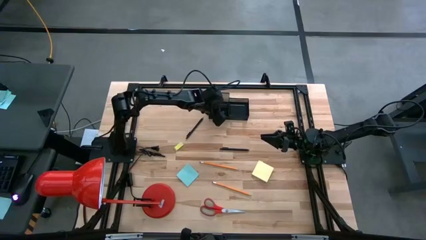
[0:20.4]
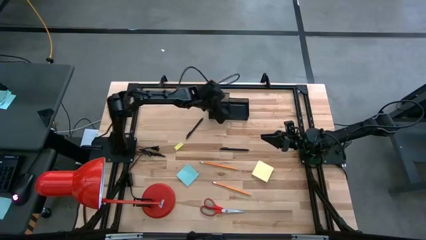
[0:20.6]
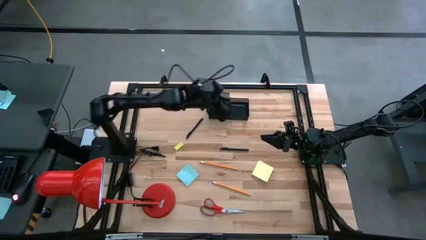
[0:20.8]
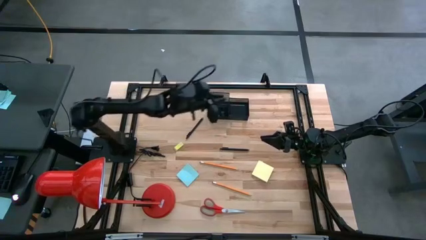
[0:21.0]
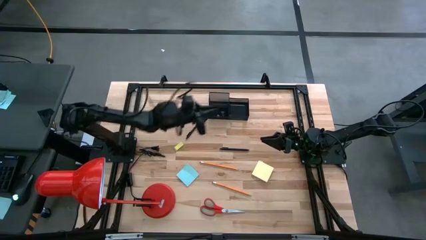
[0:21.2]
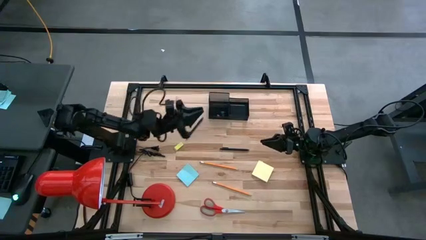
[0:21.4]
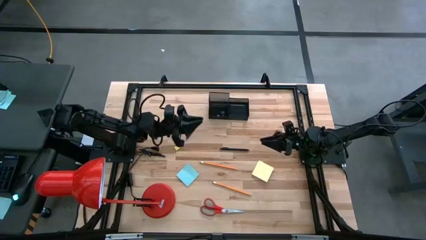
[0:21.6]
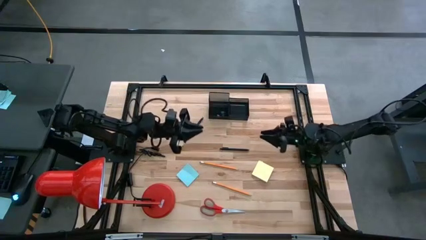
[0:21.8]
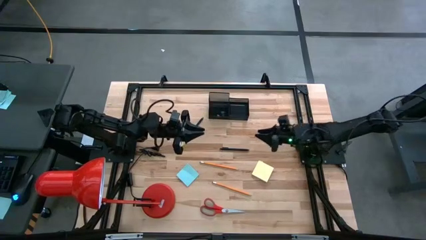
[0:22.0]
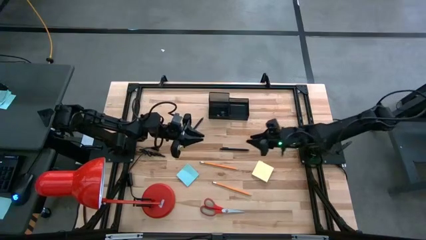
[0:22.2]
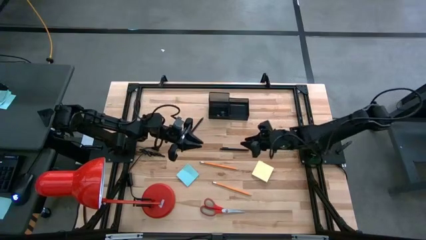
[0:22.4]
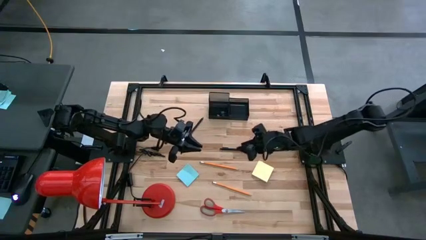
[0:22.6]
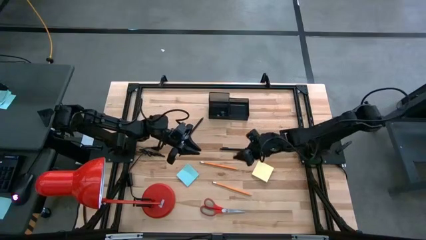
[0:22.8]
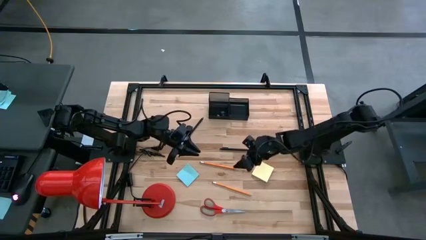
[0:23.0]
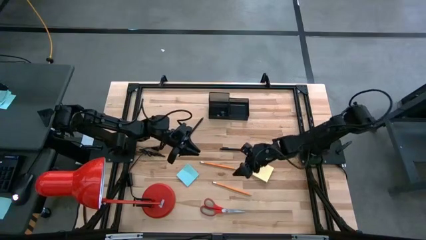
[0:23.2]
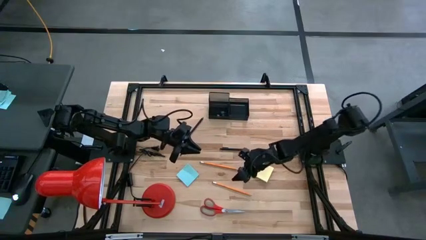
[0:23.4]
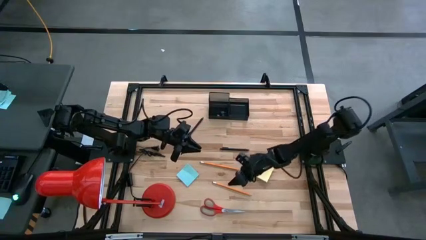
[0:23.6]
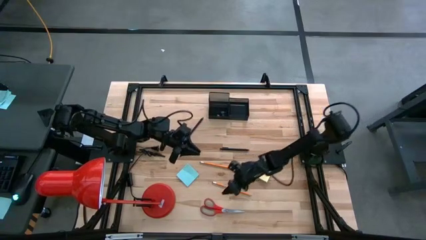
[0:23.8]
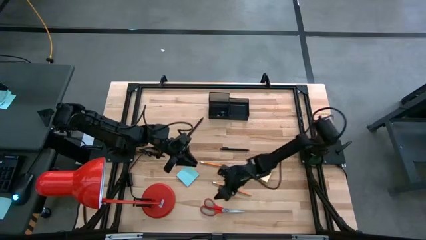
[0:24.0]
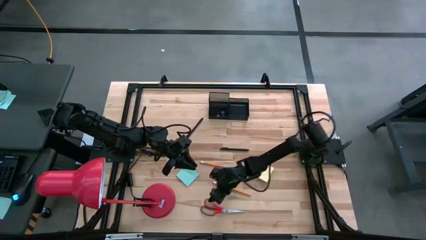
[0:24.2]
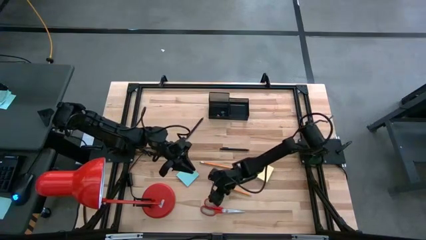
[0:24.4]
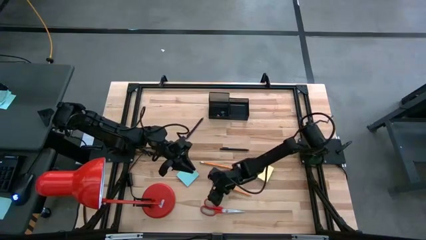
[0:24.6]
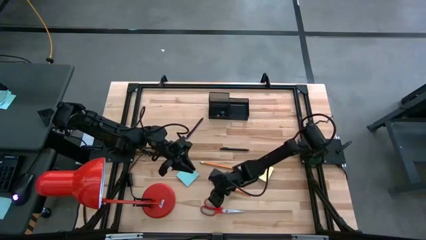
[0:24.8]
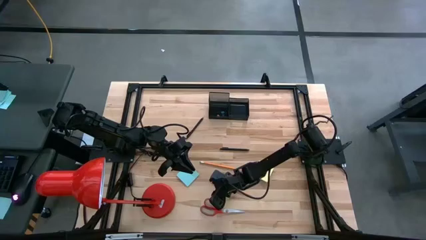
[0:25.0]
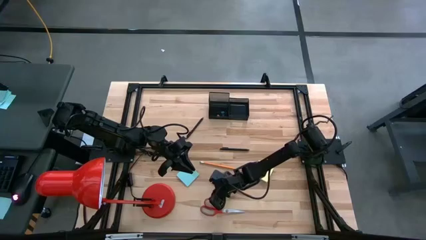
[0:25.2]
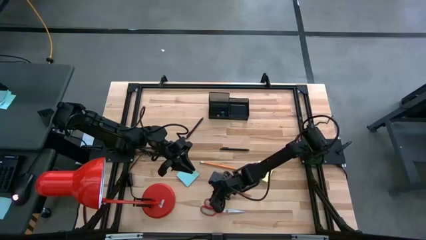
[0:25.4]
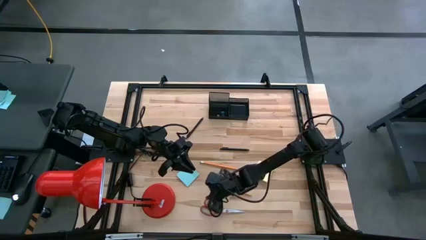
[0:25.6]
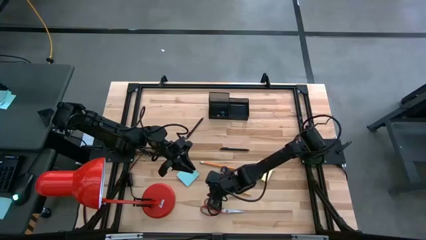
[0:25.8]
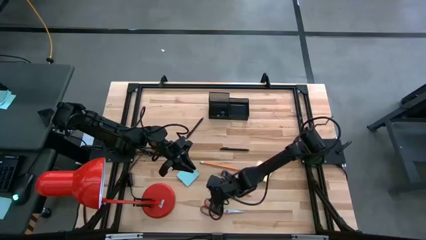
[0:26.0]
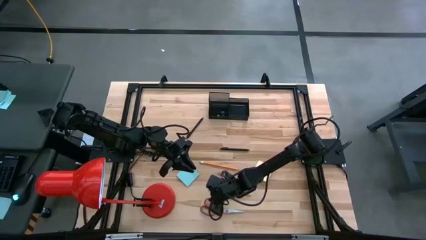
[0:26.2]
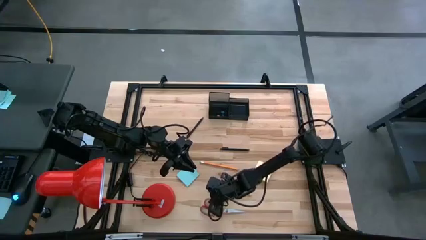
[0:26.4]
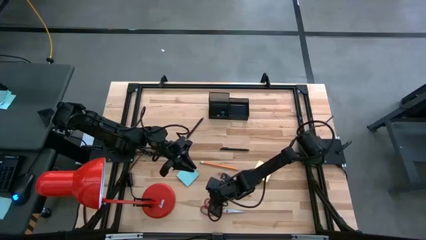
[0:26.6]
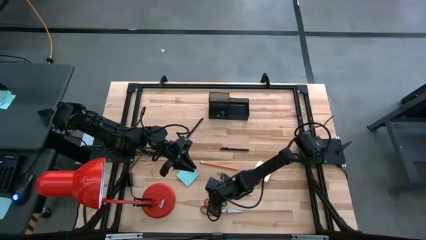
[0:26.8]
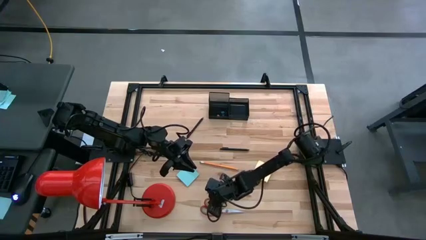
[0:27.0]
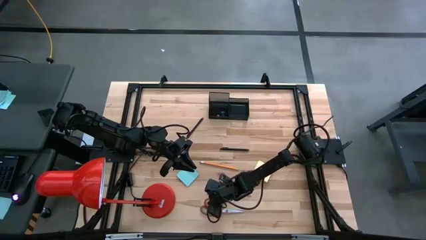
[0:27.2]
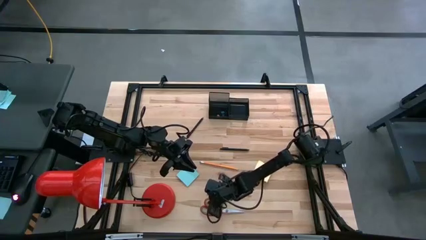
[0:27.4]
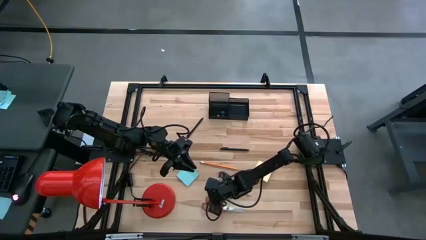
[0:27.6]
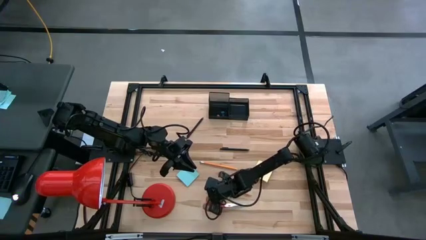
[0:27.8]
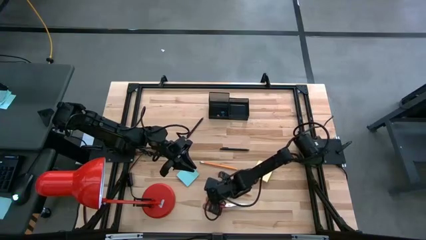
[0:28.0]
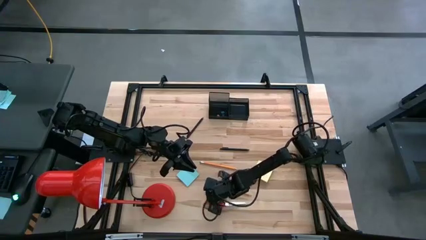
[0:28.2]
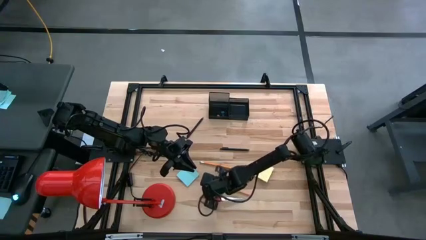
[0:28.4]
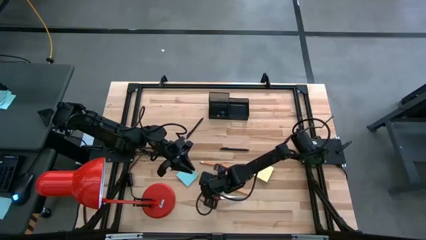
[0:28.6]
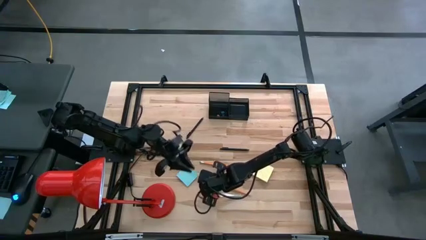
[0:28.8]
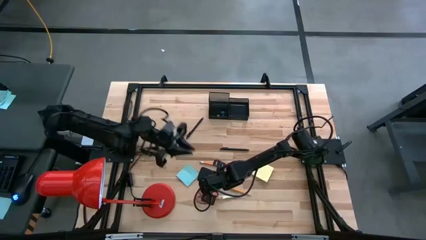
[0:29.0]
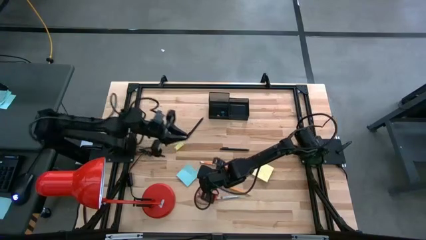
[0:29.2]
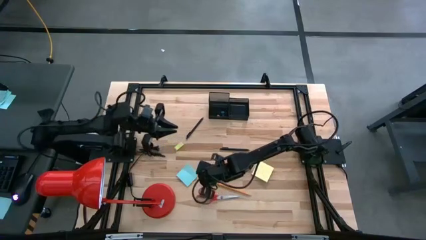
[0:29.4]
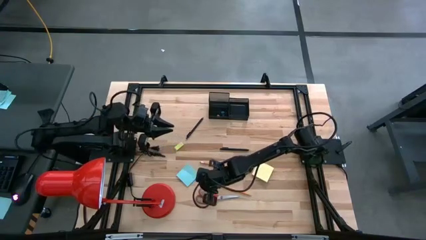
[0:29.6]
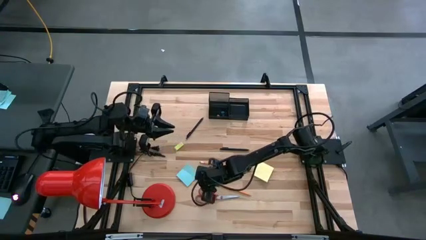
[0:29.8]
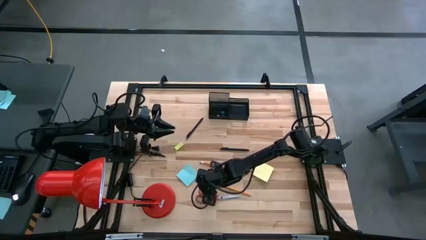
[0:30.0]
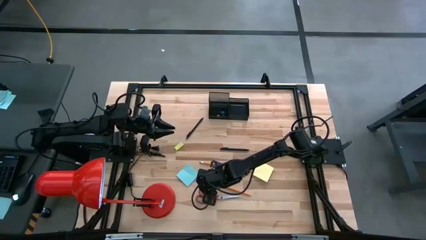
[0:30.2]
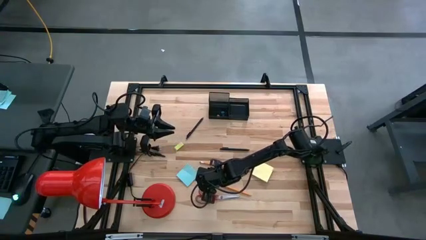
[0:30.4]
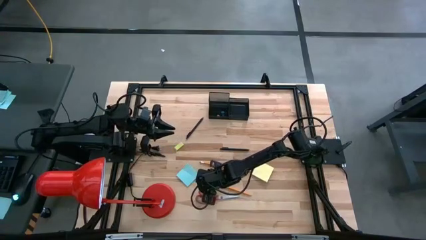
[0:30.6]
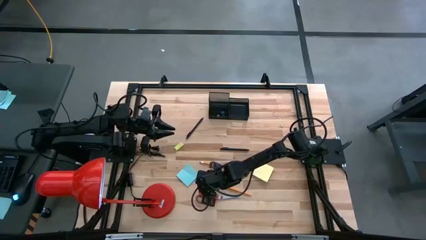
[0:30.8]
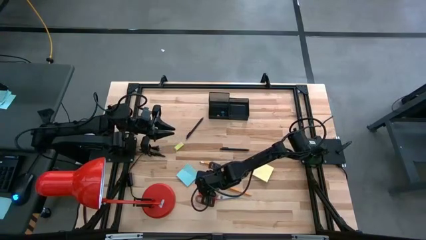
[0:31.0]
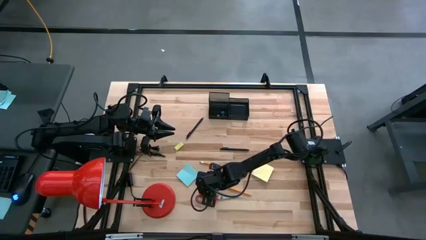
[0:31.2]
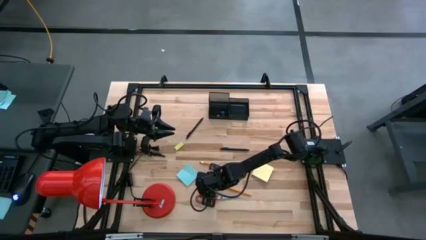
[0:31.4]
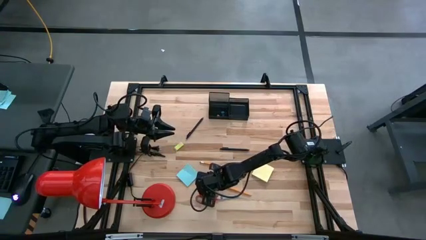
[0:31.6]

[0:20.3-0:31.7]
Task: Pick and place office supplies into organizer
Put the orange scissors in the black desk organizer

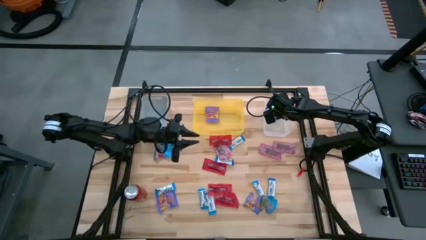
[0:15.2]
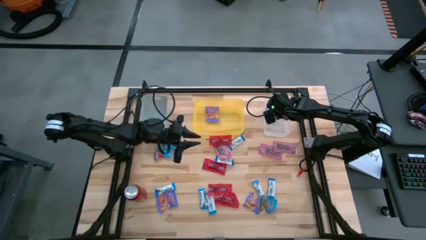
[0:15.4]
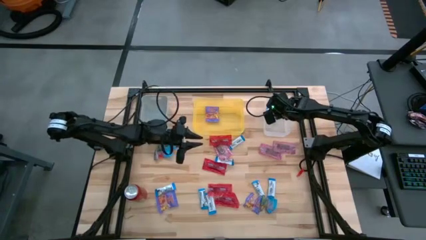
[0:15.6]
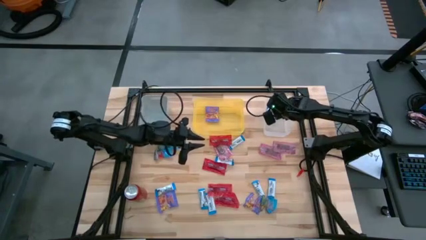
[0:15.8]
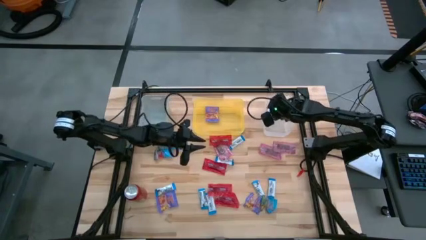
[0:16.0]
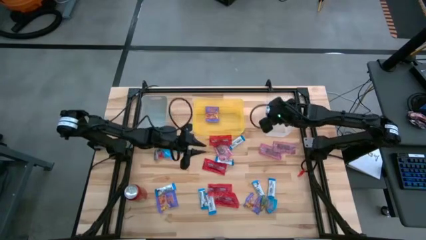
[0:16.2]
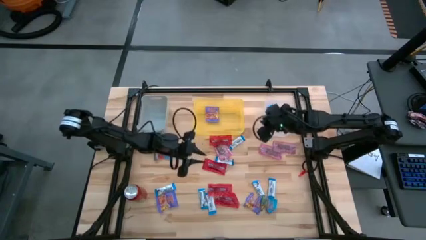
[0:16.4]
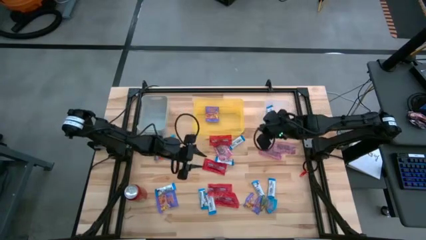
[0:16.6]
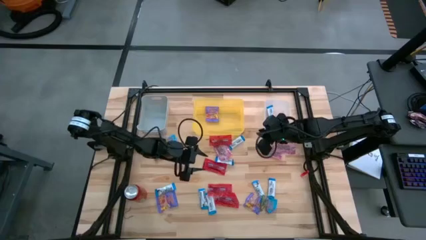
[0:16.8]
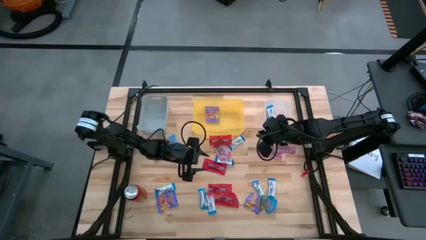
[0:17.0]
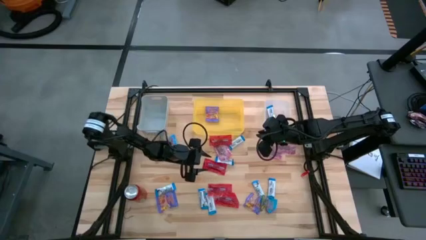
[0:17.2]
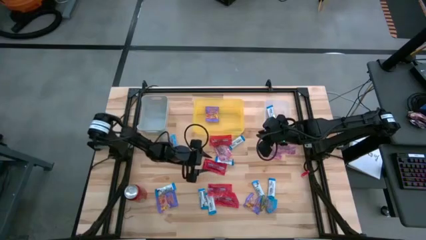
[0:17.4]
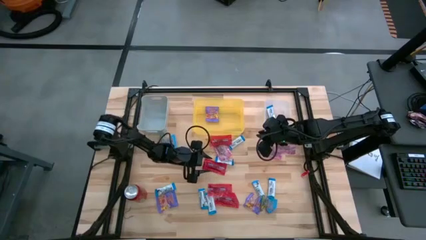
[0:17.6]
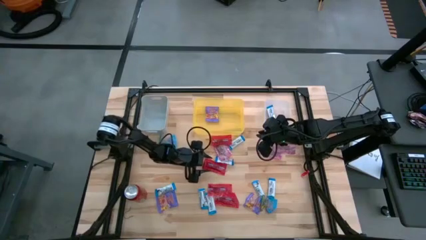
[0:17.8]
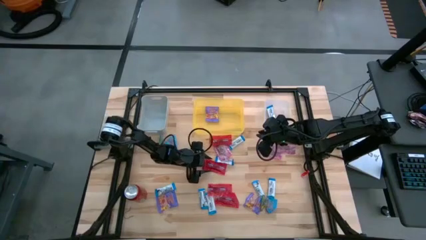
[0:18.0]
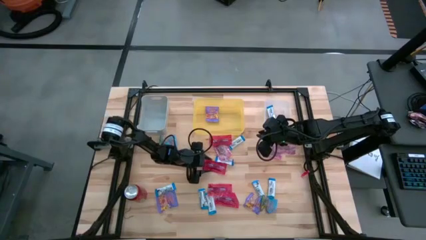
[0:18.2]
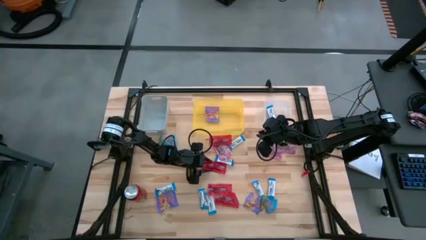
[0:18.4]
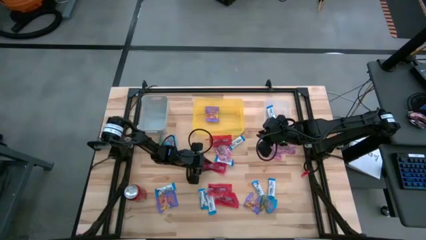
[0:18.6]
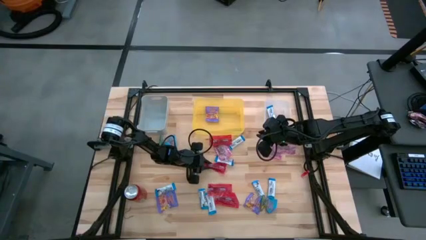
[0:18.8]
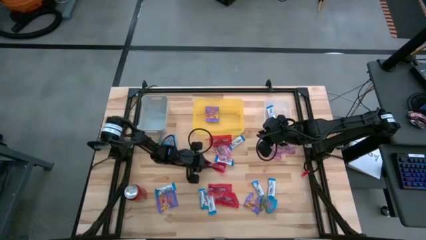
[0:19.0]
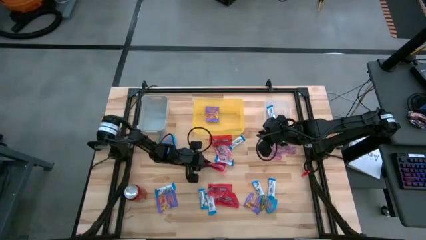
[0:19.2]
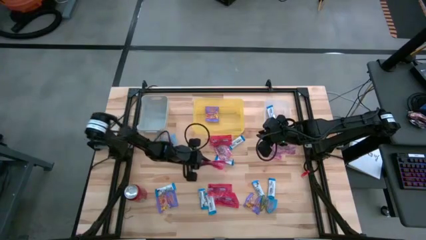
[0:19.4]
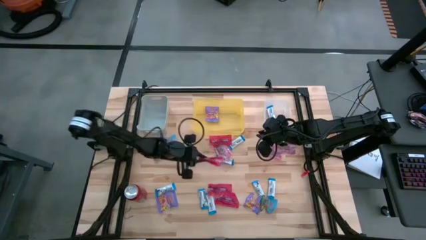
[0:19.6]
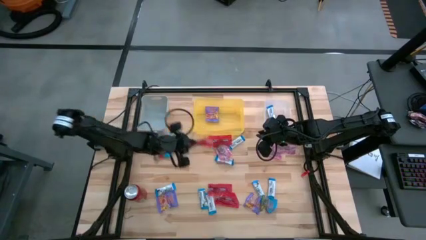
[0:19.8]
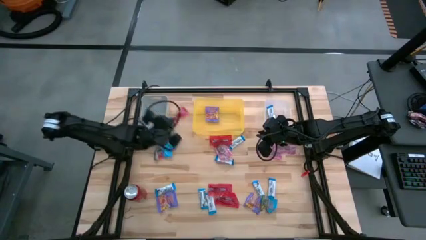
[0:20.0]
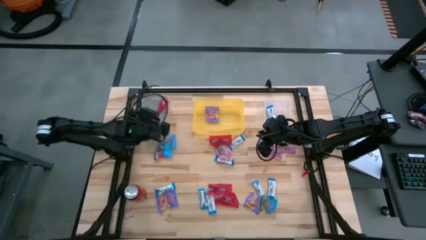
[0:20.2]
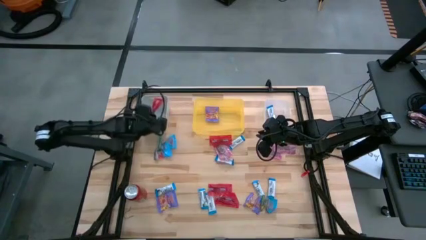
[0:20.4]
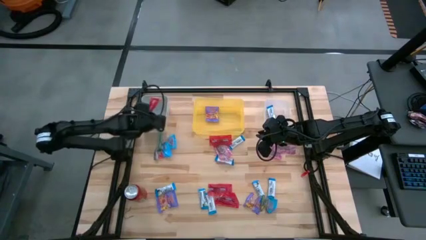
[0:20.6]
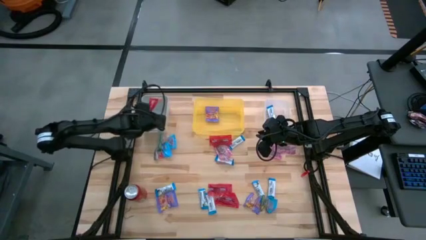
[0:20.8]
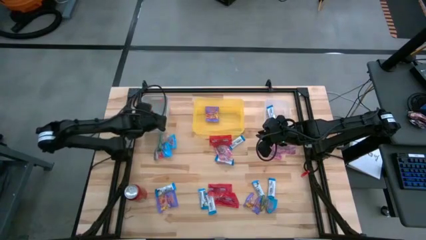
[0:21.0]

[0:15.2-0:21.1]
Task: Sort candy
Put the red gummy into the gray bin
